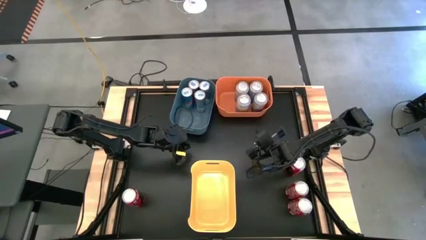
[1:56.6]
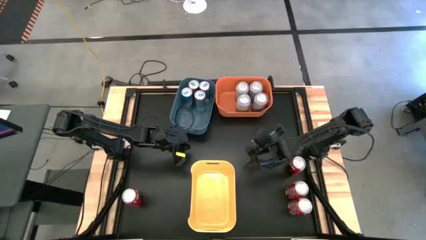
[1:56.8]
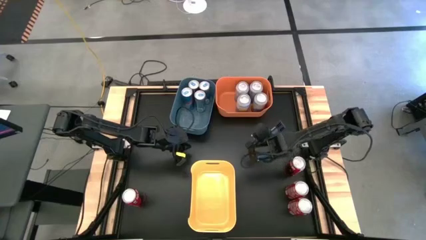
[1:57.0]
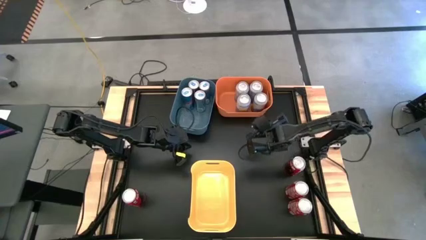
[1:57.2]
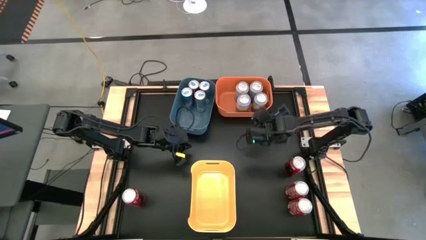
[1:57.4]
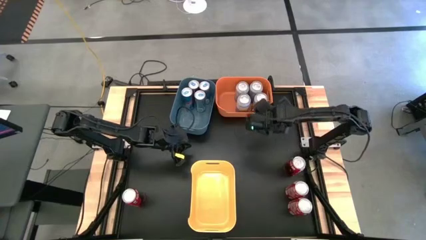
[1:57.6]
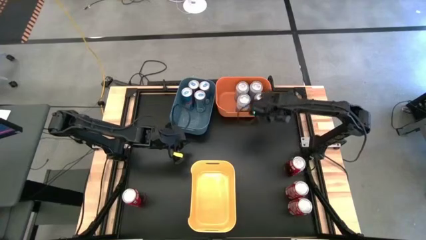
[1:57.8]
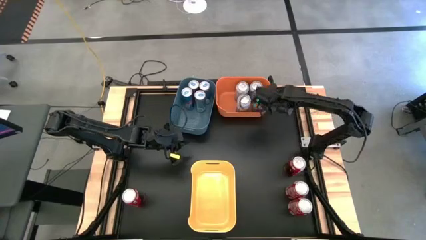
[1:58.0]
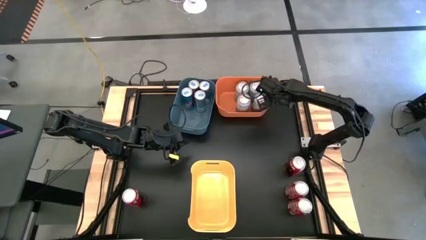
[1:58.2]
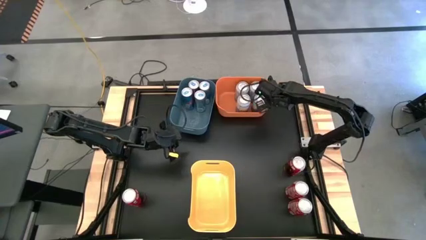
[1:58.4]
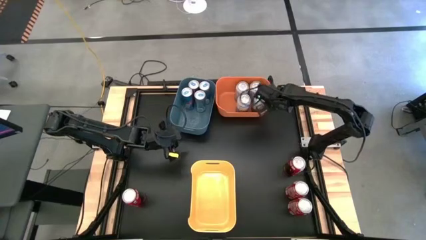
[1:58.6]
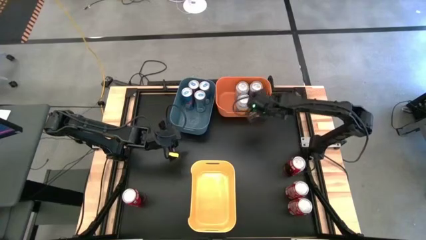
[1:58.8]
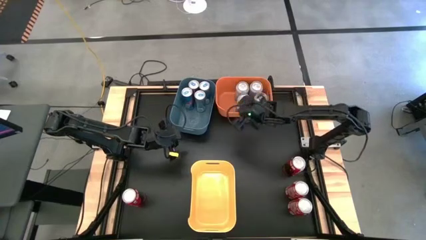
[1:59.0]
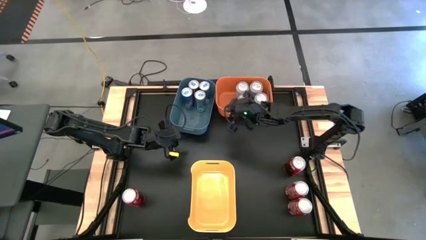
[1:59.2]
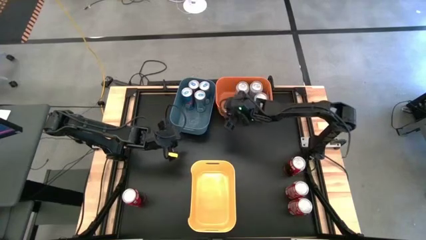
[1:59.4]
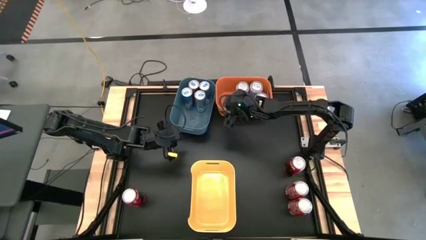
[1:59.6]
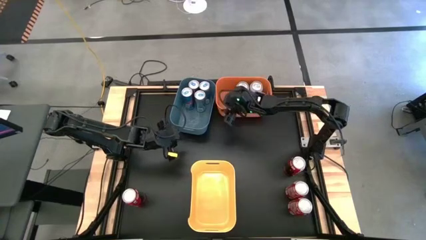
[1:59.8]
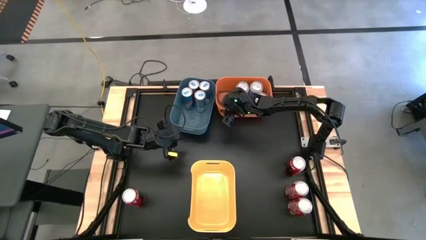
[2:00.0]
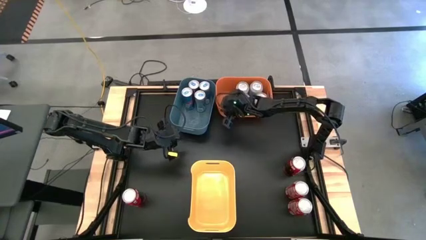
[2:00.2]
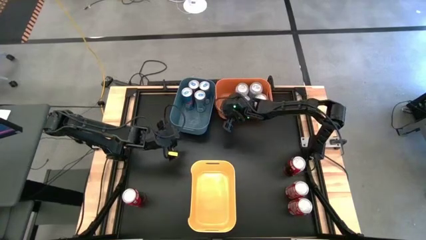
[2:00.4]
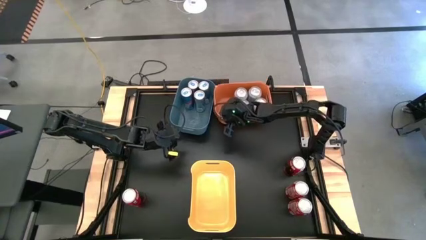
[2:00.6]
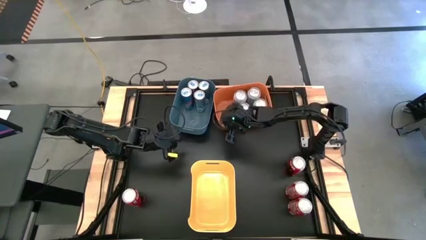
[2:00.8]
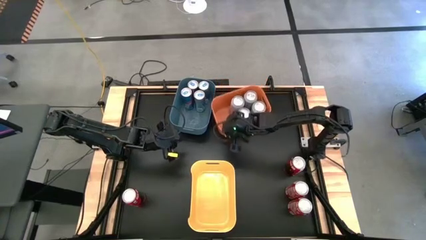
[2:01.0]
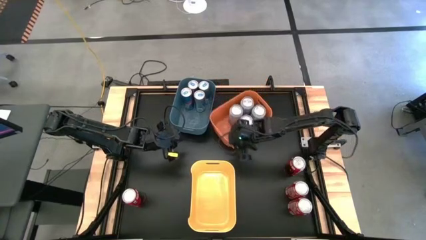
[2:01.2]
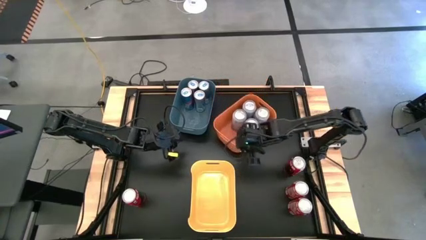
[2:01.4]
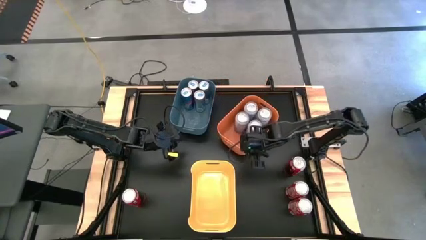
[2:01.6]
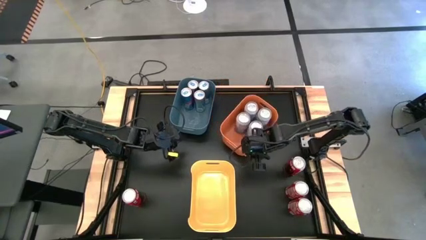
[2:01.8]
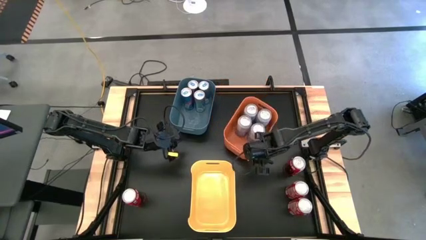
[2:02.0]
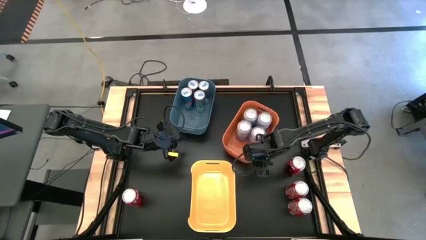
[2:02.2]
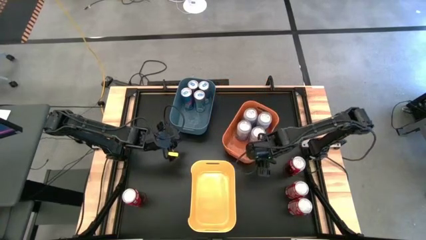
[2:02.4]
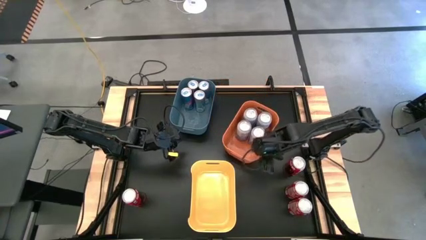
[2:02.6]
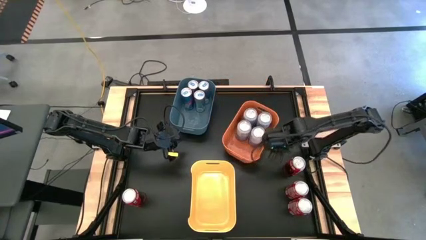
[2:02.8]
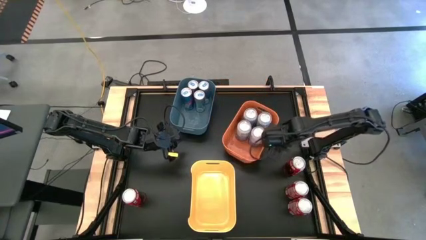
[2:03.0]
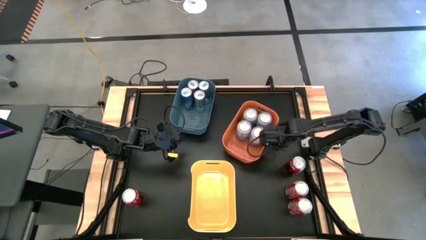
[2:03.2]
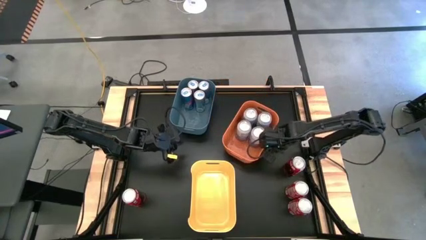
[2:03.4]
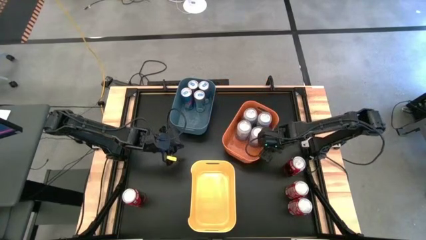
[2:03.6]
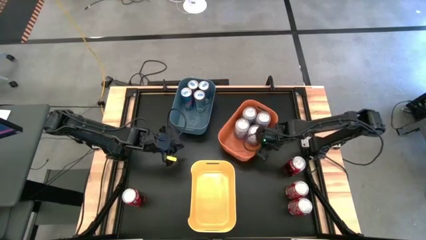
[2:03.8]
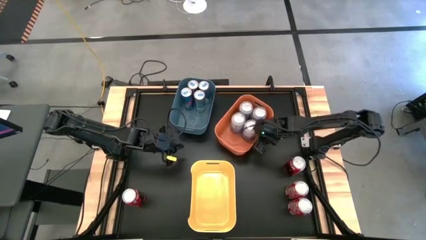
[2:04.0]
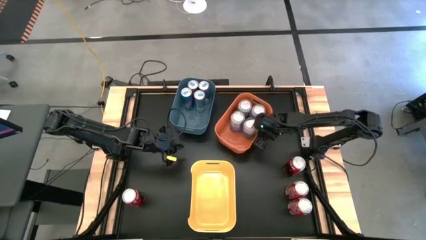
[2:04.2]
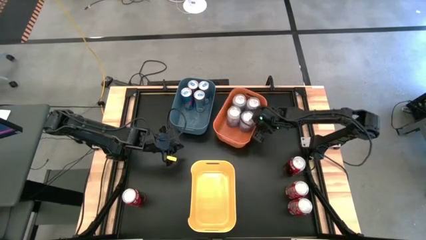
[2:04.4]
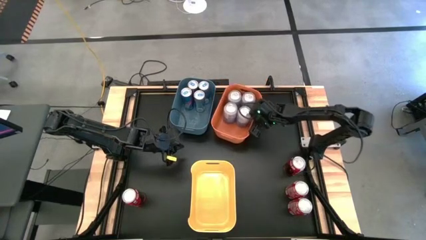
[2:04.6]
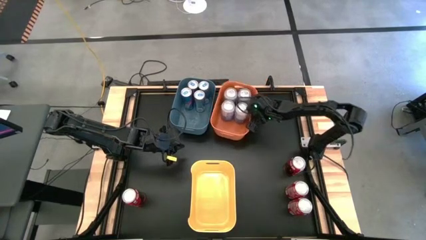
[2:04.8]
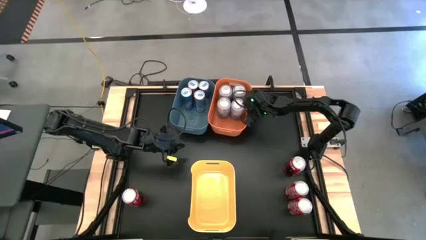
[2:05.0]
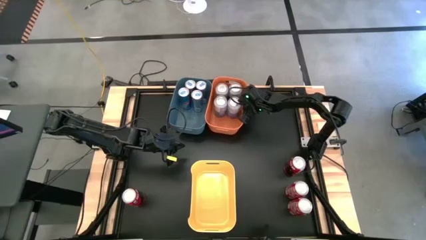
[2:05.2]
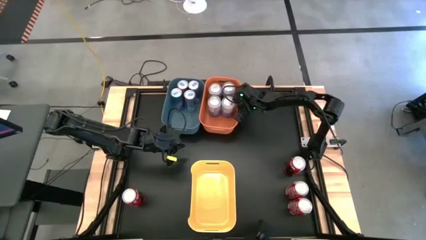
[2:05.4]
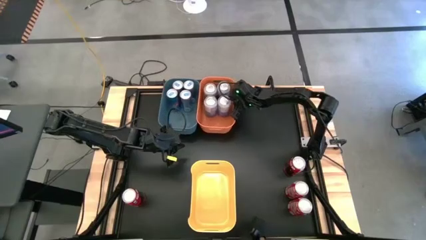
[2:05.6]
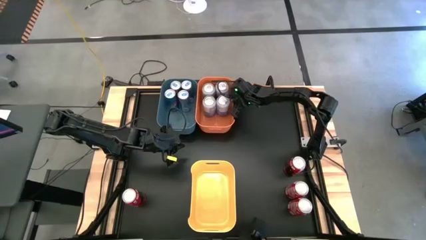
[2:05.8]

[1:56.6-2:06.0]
Task: Sort soda cans
Adjust the orange bin

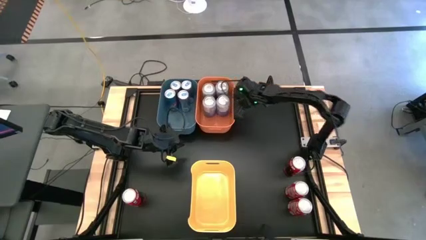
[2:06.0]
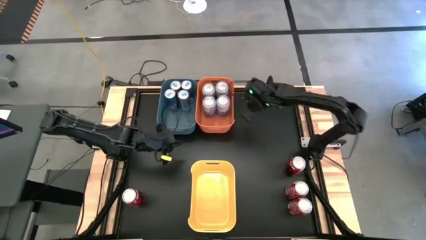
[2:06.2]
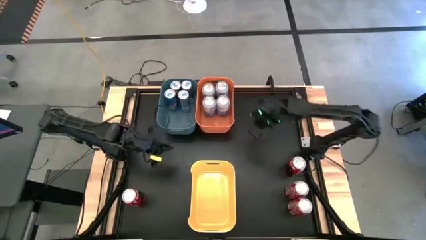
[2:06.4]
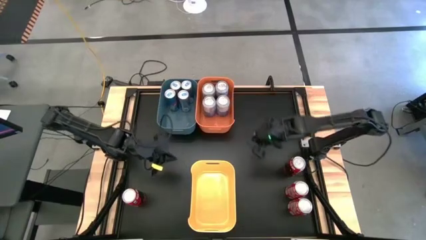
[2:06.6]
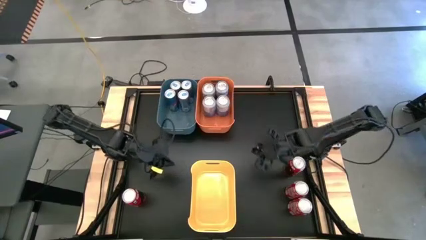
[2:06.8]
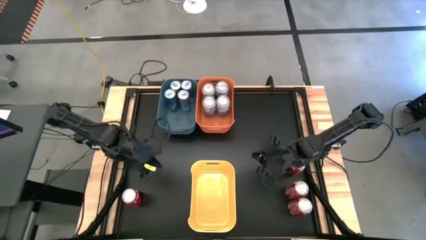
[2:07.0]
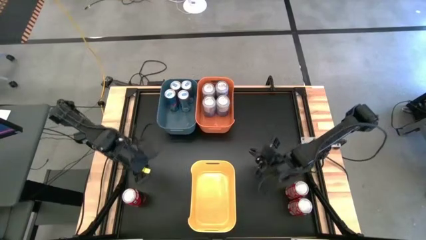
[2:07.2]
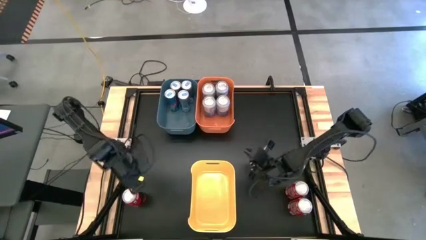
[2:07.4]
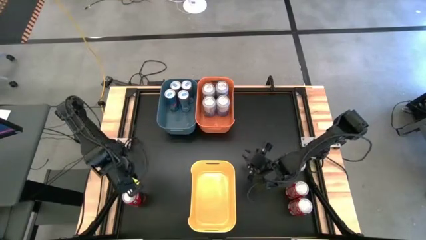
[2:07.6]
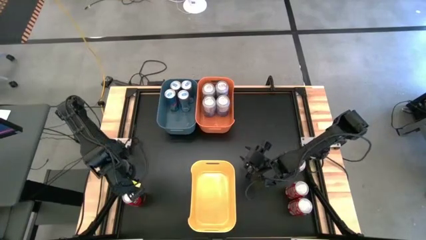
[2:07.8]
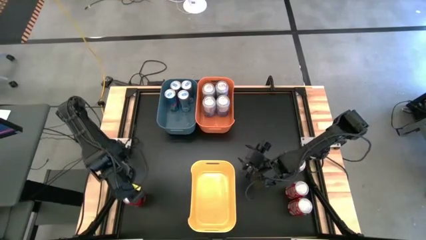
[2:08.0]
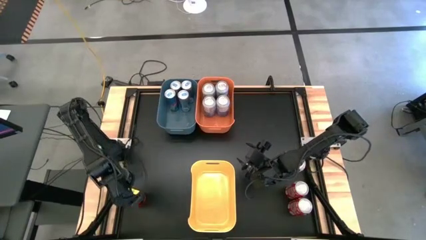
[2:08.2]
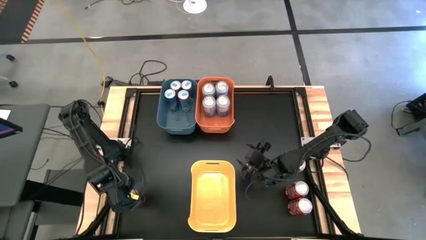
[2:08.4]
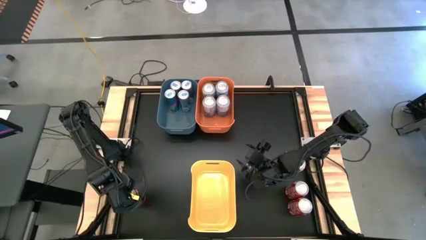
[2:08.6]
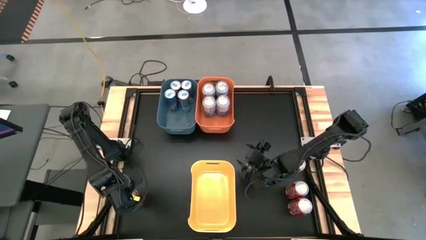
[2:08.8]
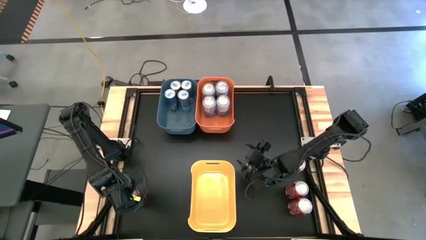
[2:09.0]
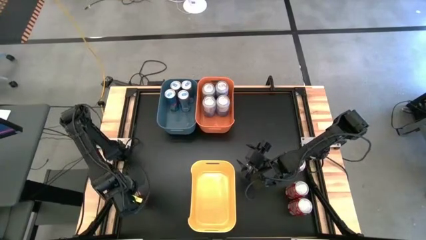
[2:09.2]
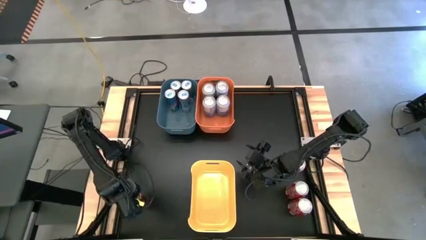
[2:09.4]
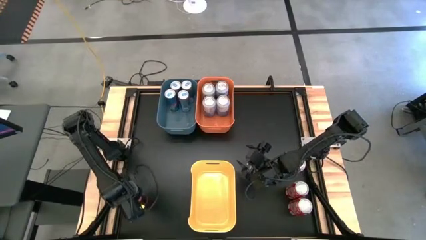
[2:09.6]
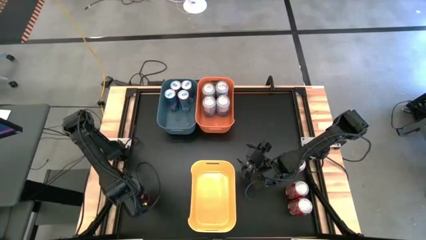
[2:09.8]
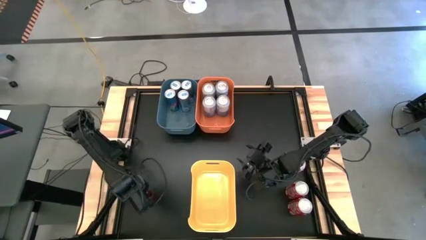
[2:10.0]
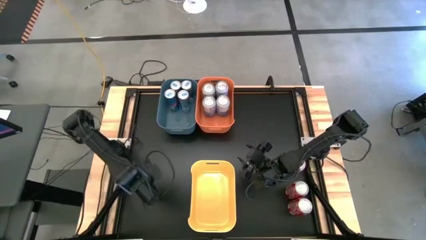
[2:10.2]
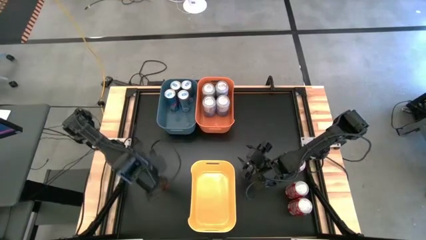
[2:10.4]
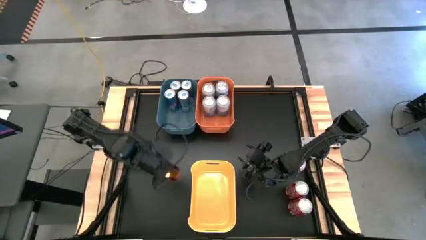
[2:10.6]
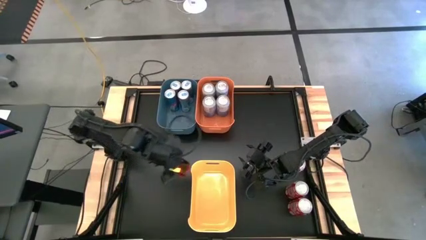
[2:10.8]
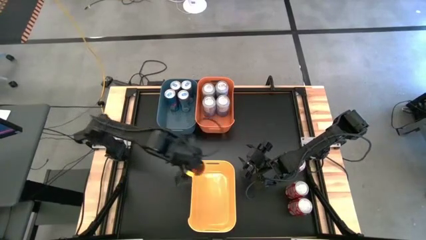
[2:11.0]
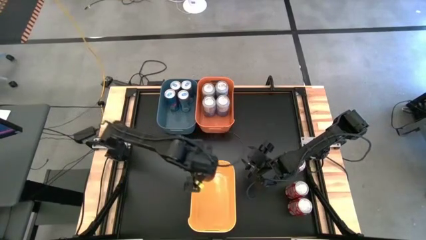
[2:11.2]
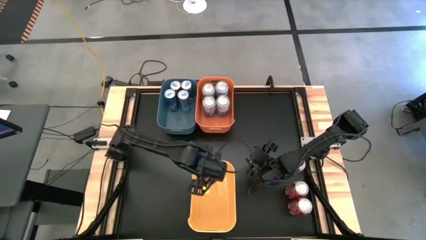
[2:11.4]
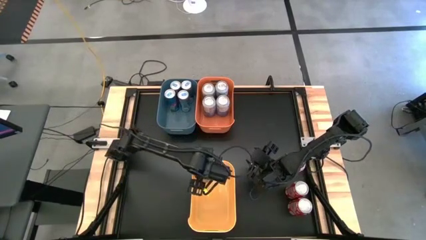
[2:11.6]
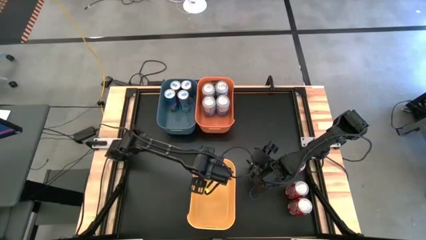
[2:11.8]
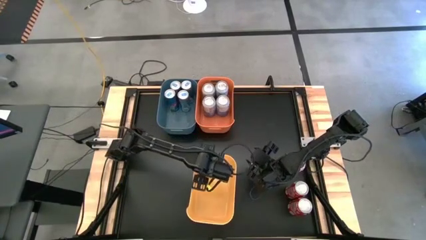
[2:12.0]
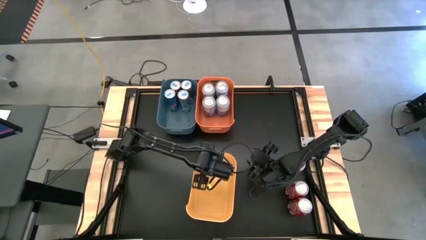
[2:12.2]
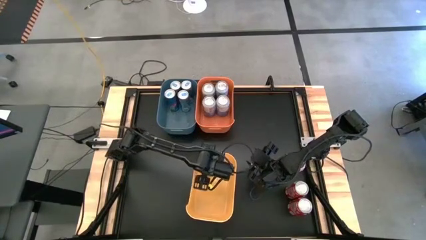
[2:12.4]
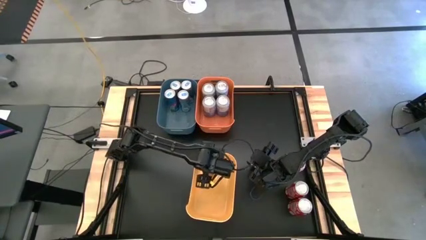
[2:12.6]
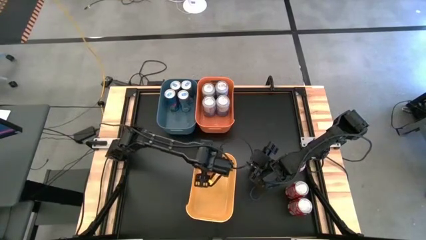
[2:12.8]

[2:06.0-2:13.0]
Put the red soda can into the yellow bin
